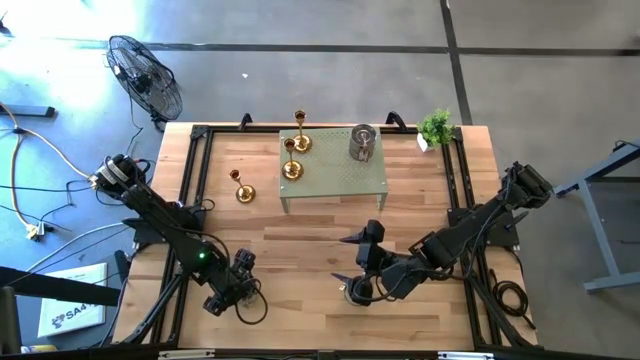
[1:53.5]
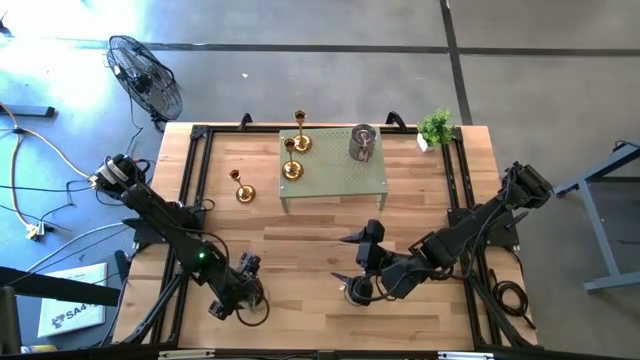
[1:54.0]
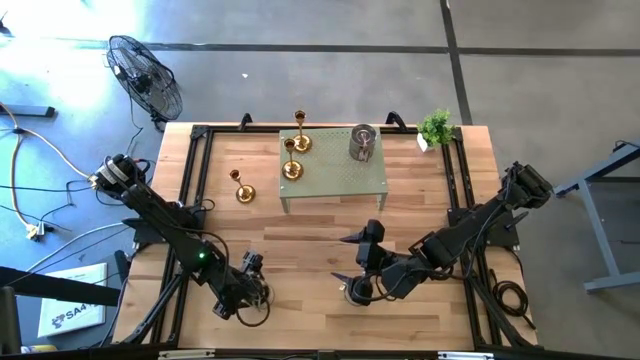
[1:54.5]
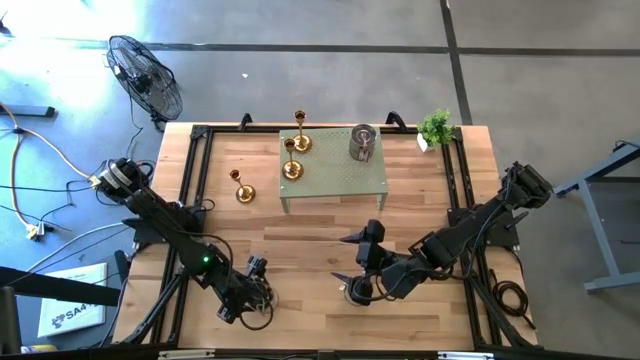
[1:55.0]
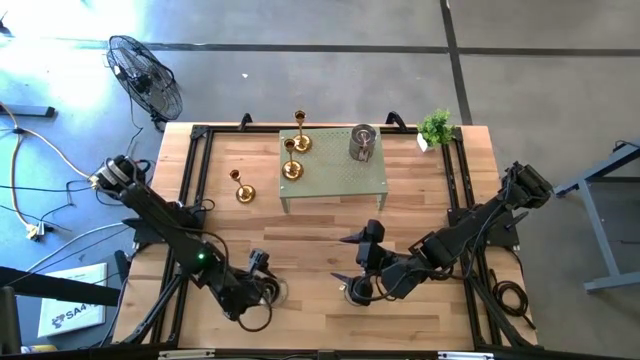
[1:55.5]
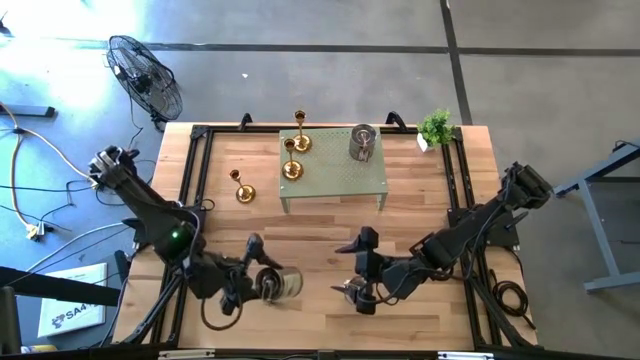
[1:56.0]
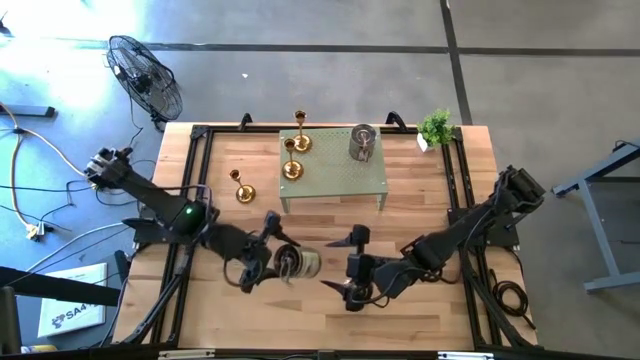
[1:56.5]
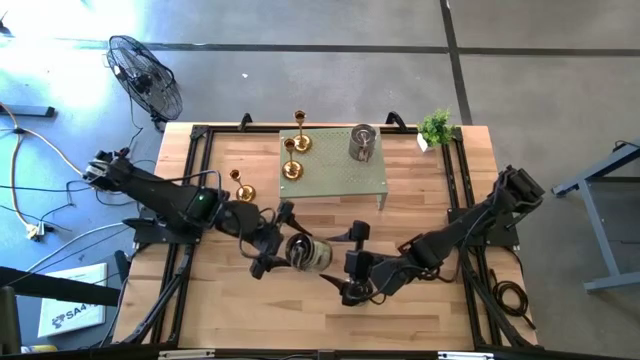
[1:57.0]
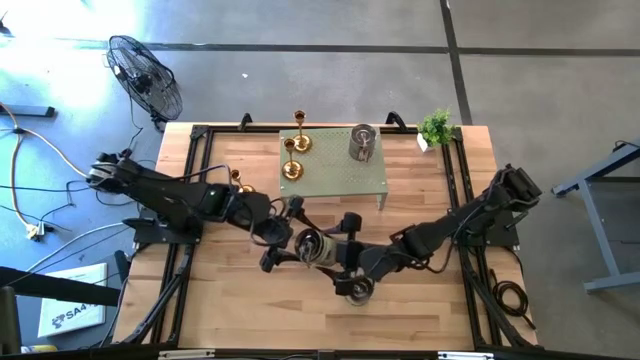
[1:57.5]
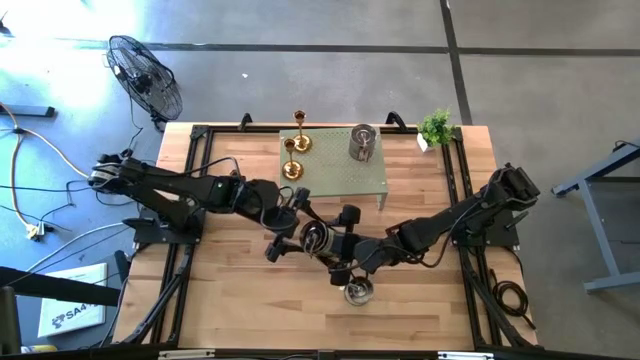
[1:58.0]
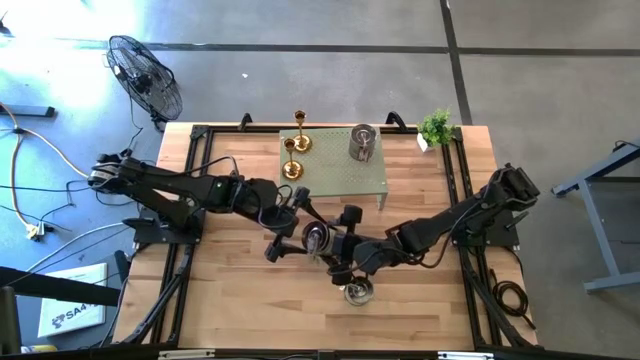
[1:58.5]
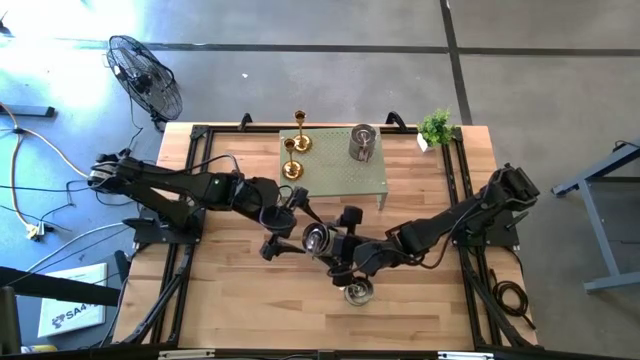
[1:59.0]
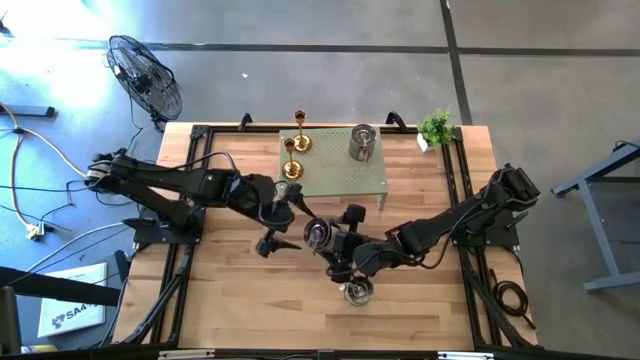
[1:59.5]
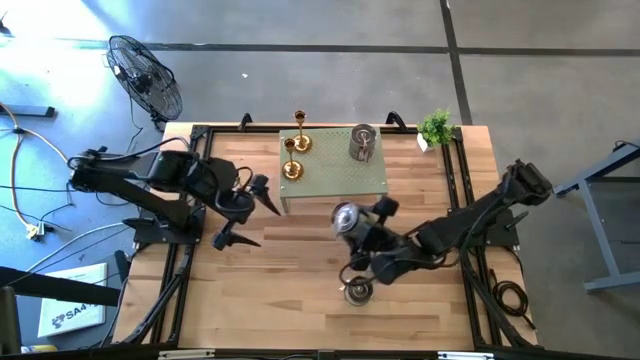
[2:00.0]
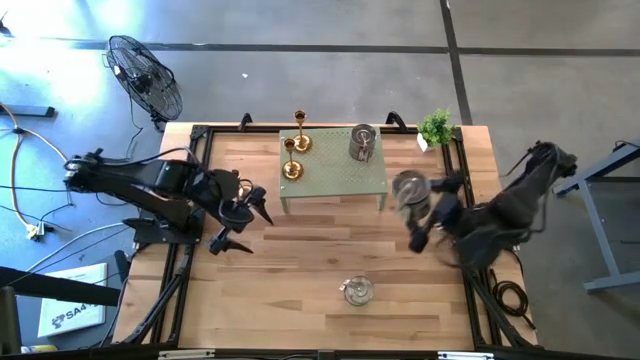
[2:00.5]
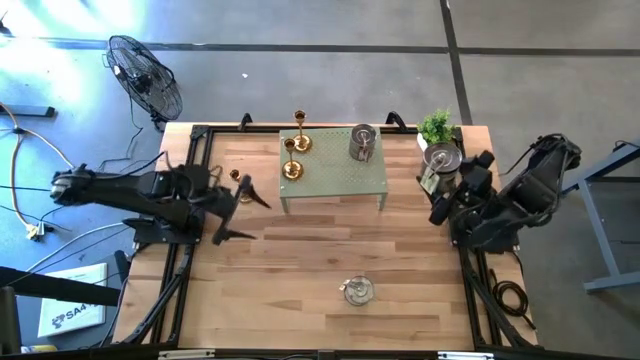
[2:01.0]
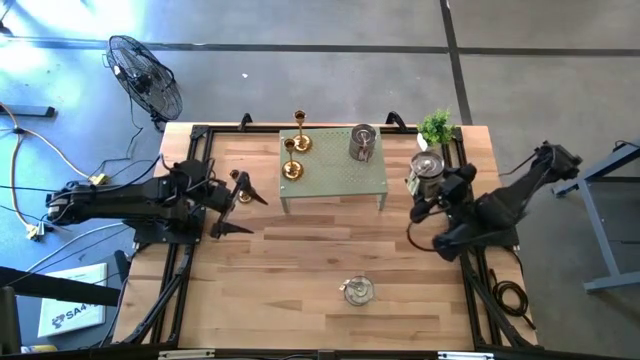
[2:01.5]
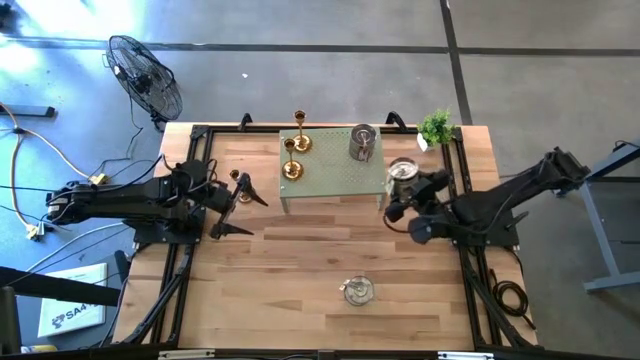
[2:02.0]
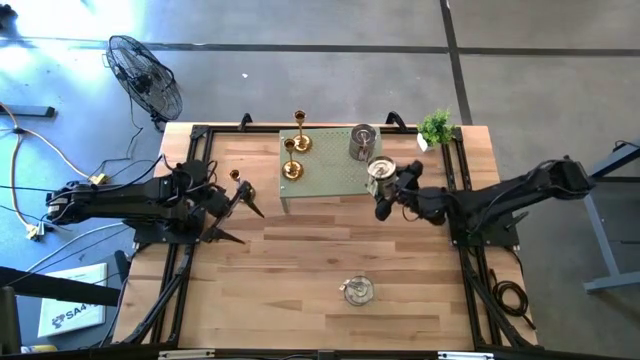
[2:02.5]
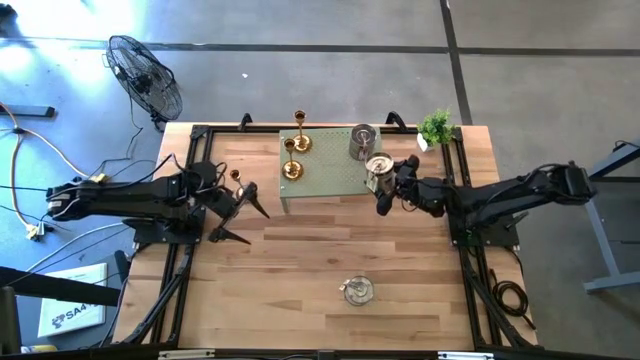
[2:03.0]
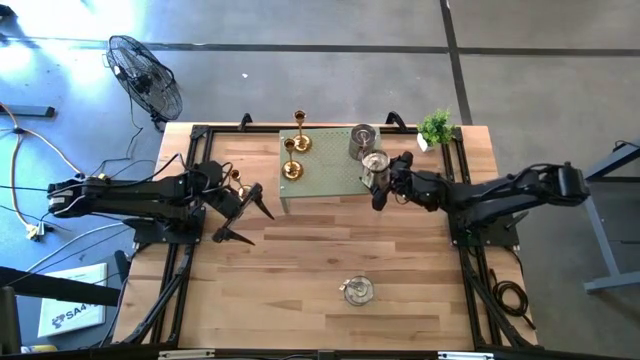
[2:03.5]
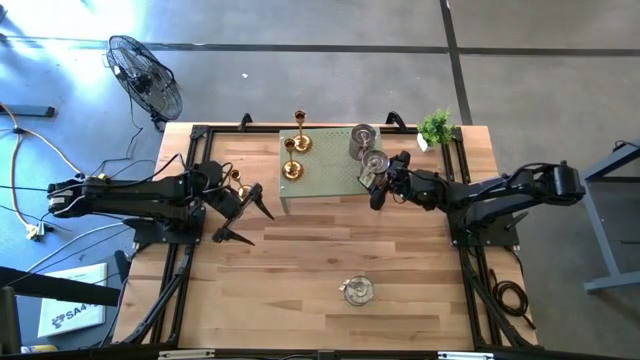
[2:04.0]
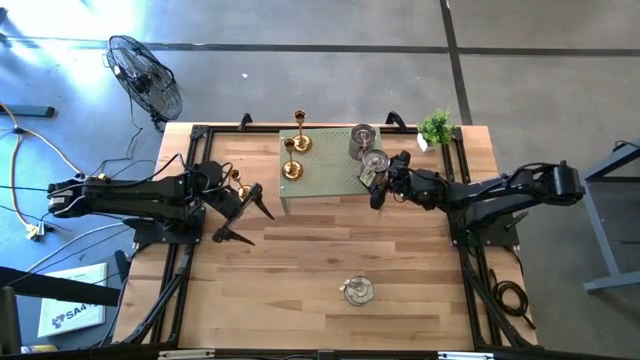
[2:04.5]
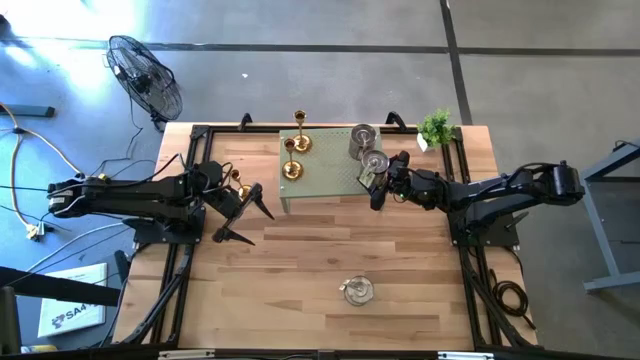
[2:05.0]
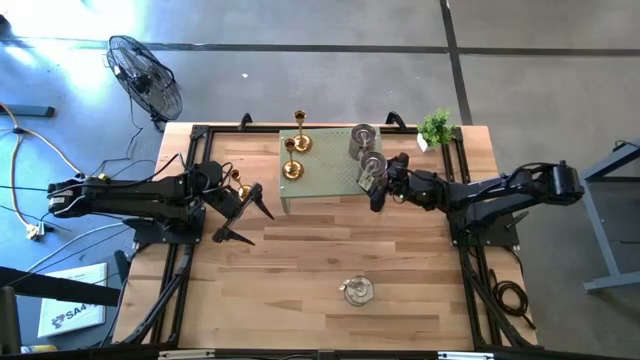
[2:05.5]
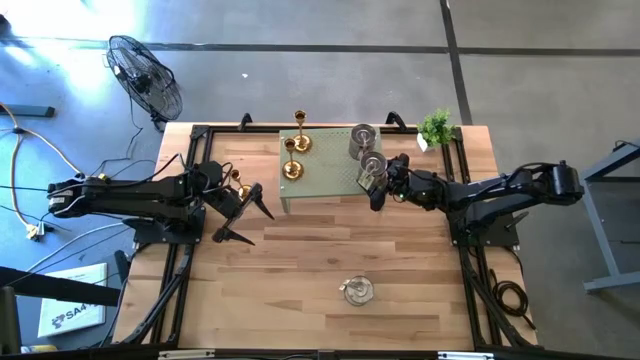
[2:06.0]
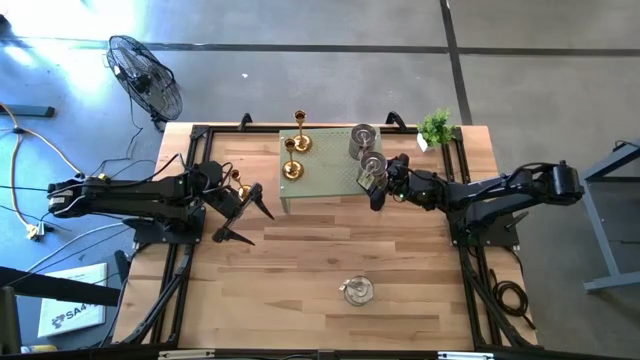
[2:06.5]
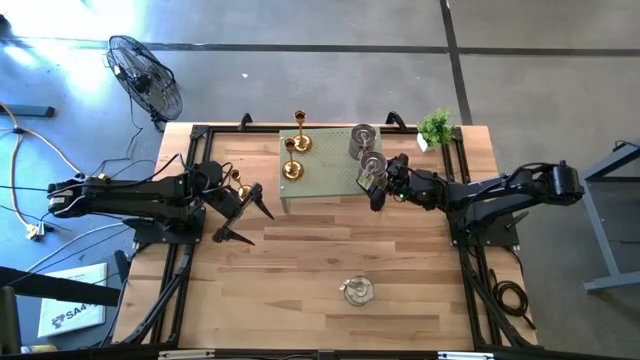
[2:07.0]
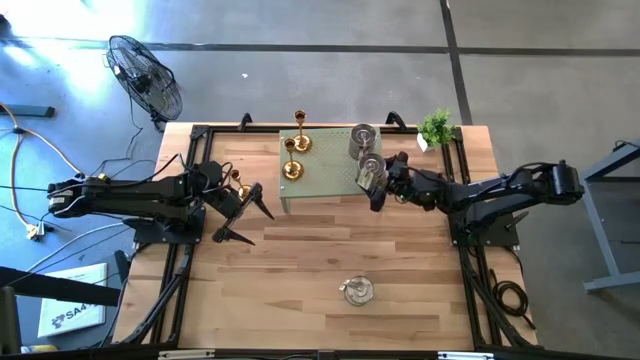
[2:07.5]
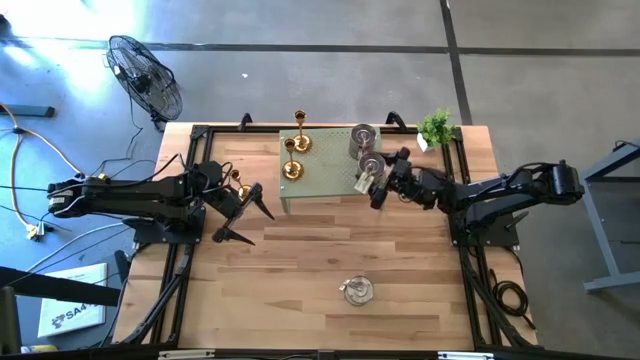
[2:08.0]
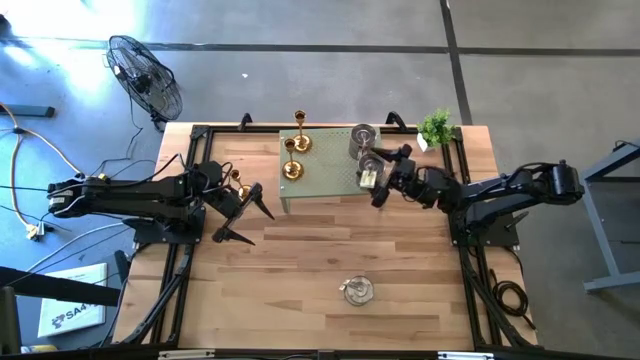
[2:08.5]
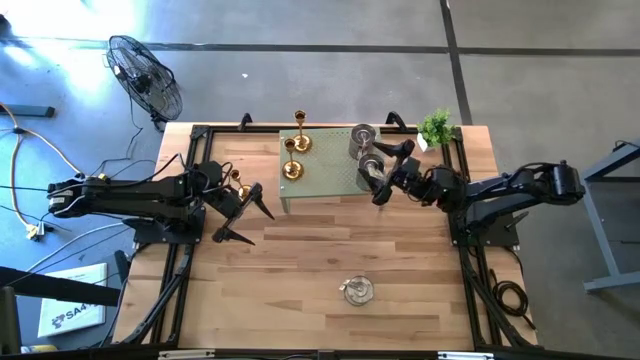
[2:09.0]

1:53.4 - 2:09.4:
Task: Pick & Place candle stick holders
Put the left silver scented candle on the shelf

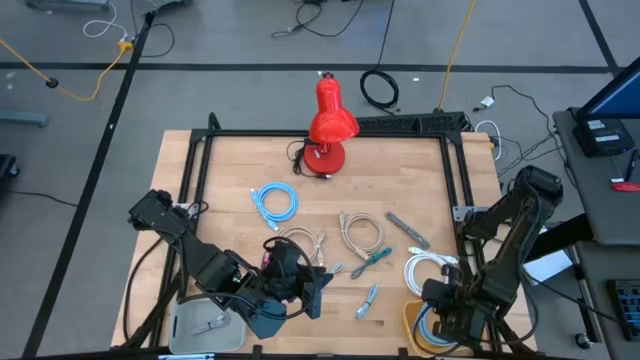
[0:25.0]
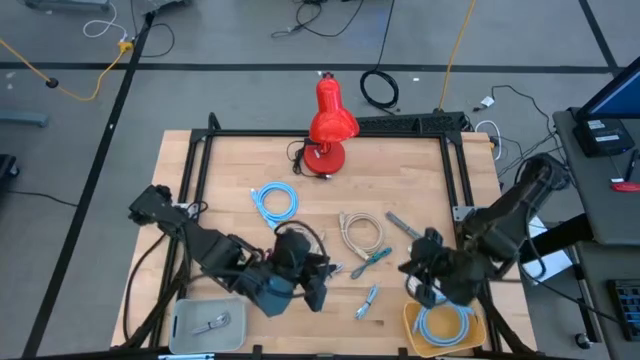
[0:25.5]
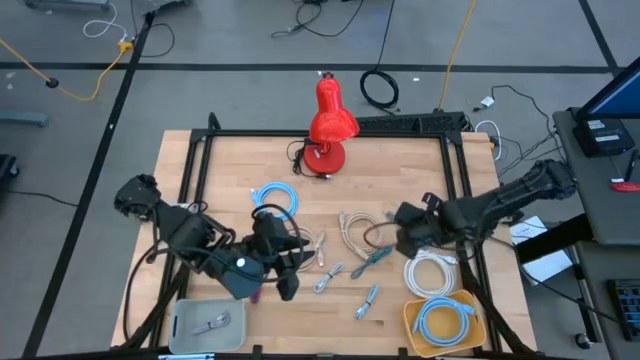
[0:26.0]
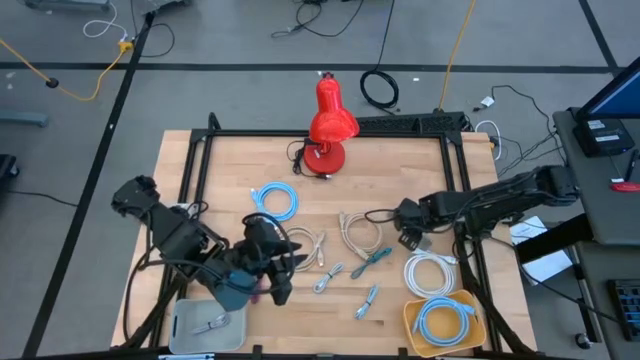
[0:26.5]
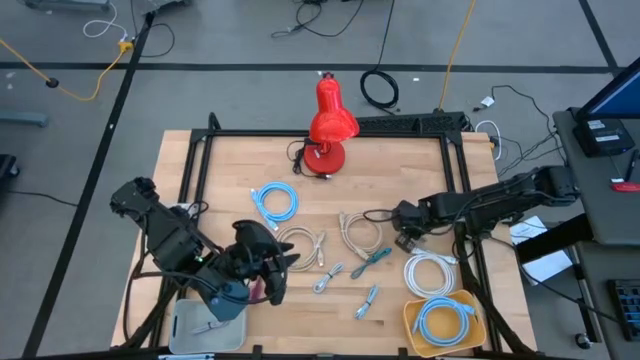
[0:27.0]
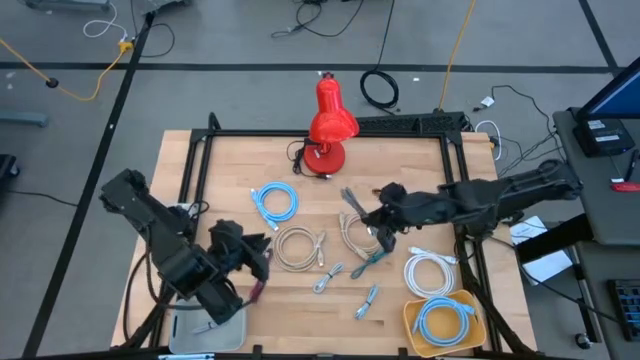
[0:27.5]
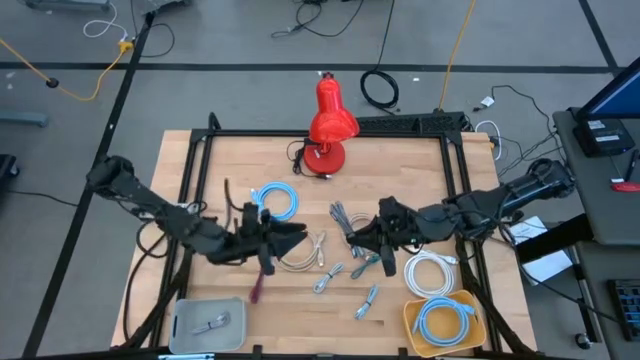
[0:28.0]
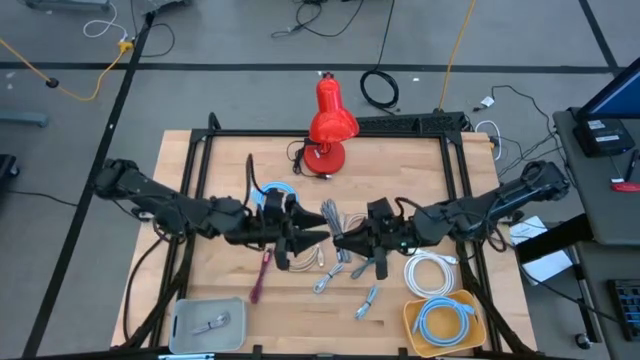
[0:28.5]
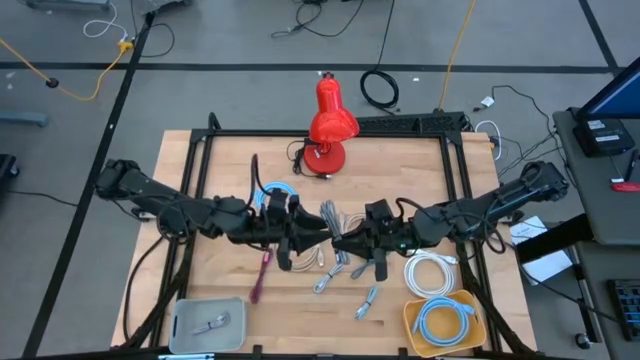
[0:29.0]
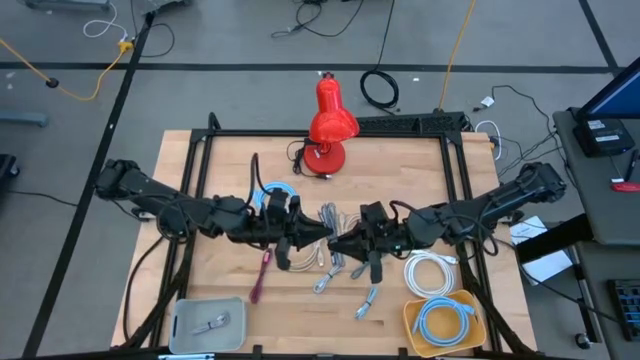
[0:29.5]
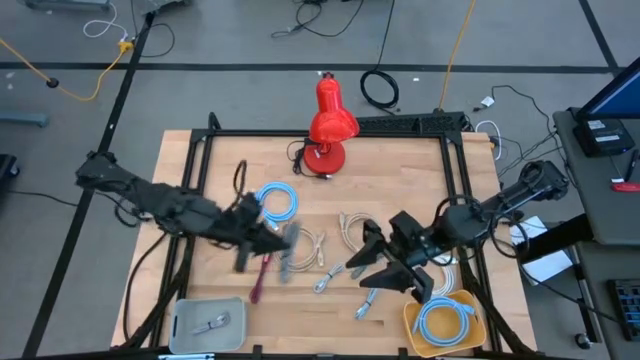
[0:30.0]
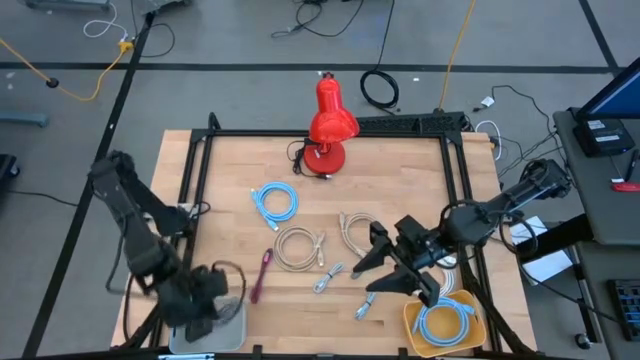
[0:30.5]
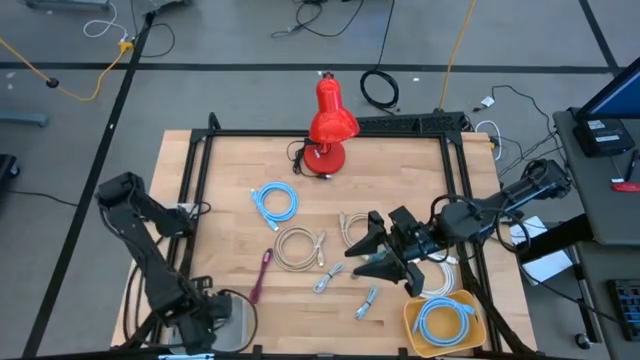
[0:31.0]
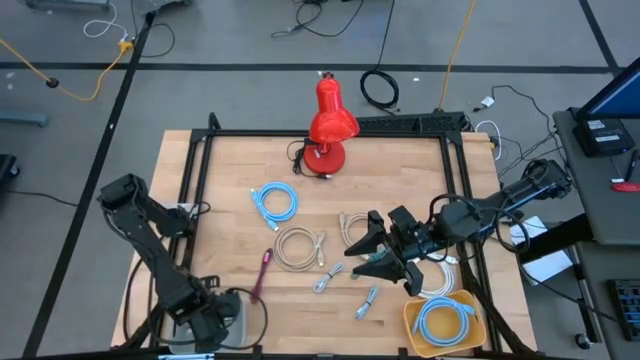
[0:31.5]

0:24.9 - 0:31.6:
Task: Pick & Place USB Port
Put the black and white charger cable into the white bin
